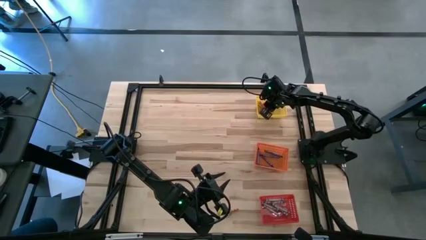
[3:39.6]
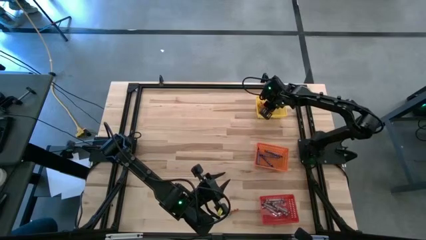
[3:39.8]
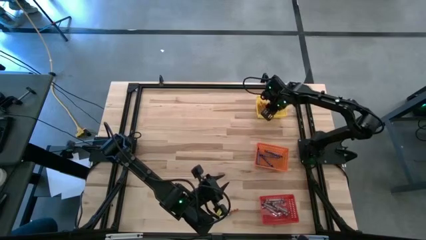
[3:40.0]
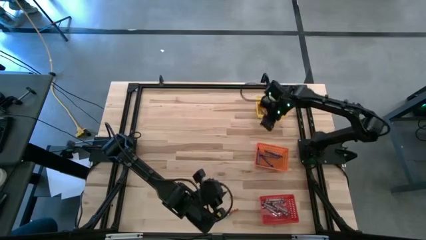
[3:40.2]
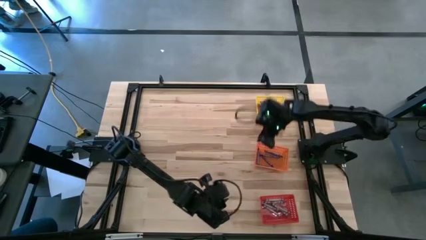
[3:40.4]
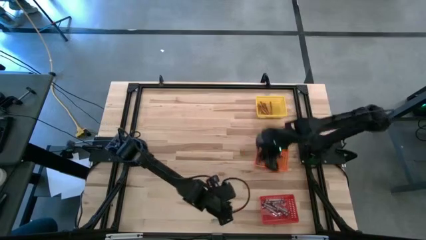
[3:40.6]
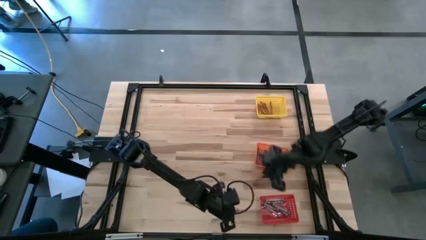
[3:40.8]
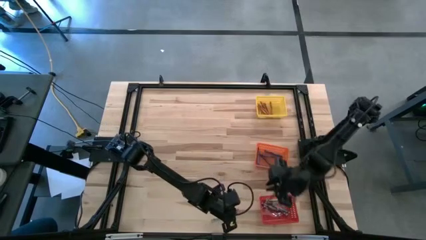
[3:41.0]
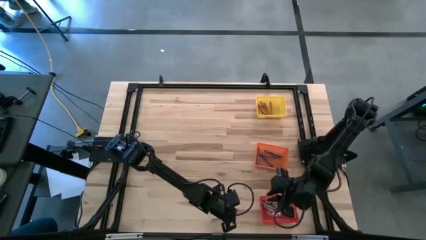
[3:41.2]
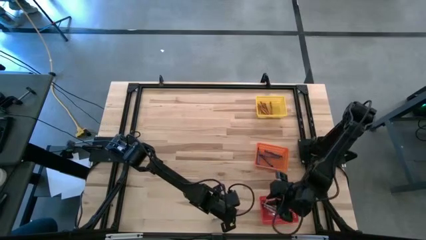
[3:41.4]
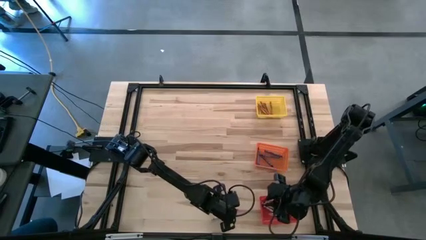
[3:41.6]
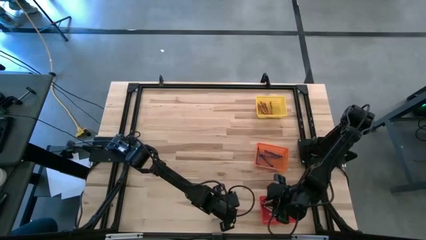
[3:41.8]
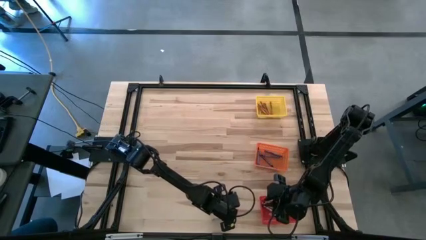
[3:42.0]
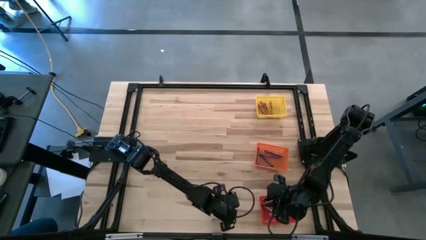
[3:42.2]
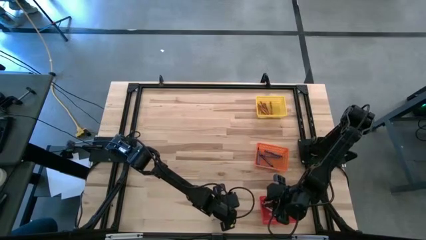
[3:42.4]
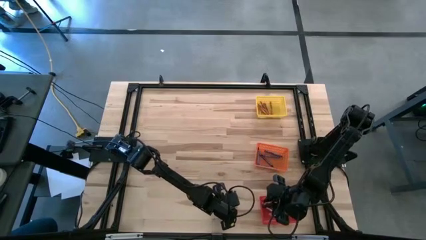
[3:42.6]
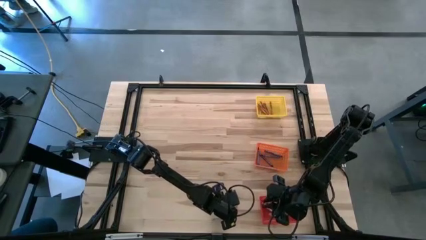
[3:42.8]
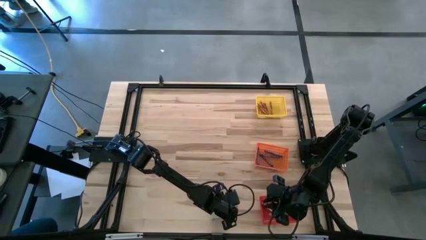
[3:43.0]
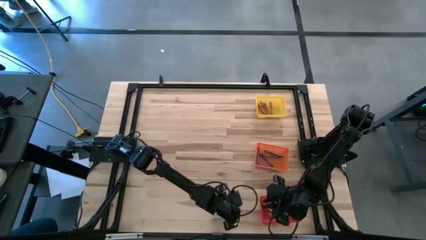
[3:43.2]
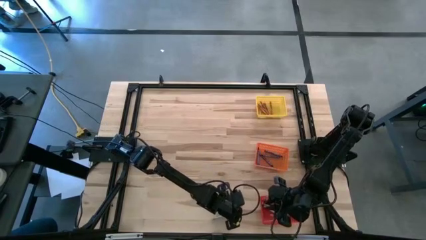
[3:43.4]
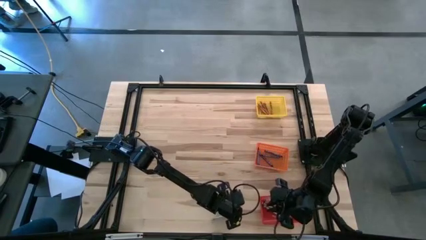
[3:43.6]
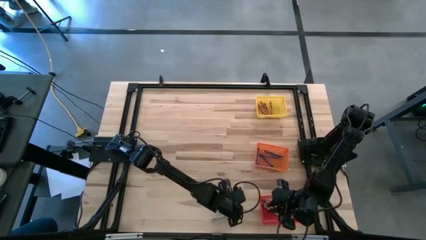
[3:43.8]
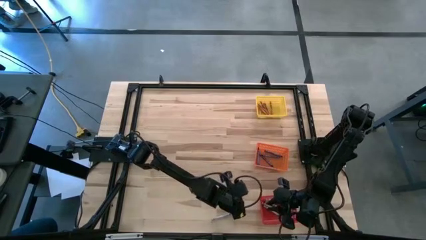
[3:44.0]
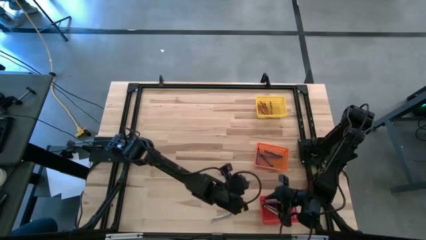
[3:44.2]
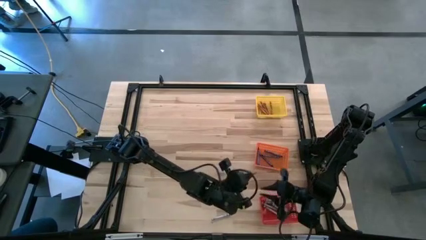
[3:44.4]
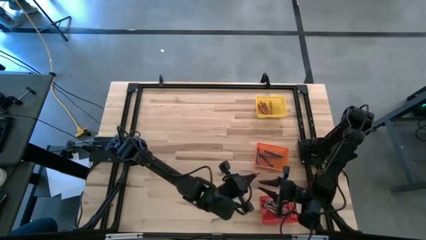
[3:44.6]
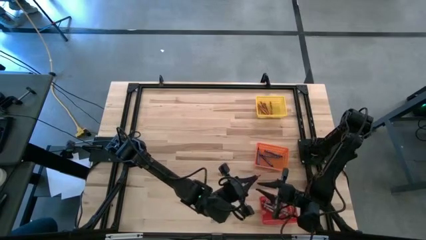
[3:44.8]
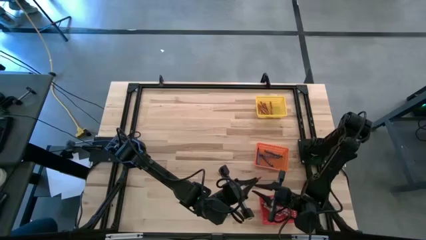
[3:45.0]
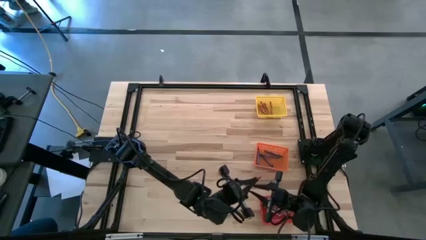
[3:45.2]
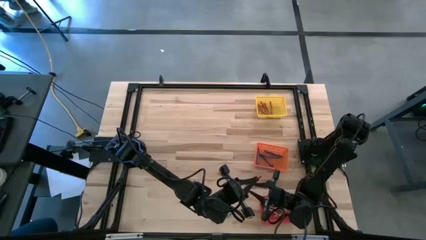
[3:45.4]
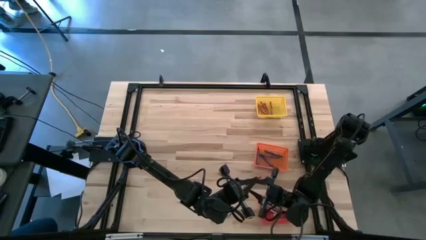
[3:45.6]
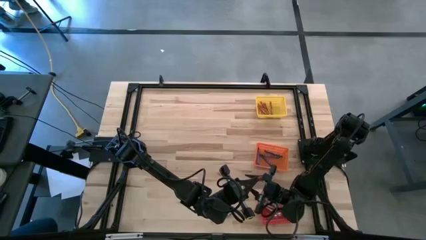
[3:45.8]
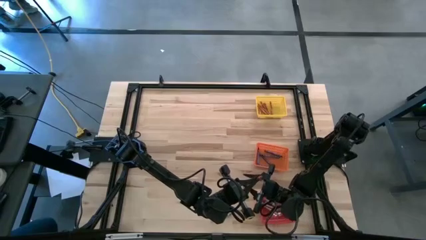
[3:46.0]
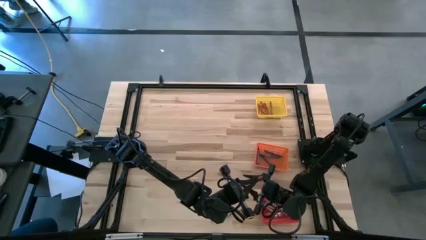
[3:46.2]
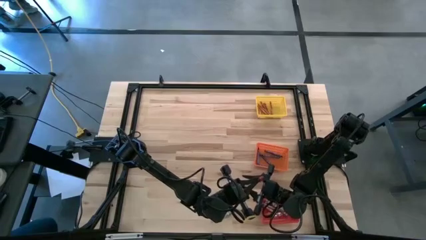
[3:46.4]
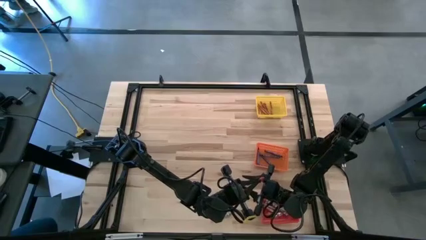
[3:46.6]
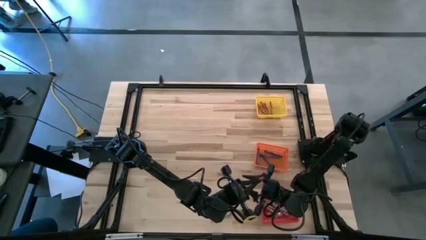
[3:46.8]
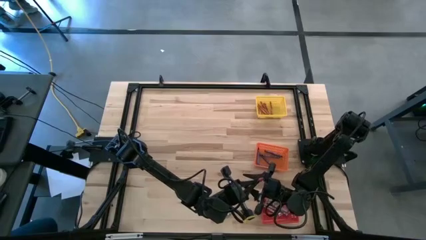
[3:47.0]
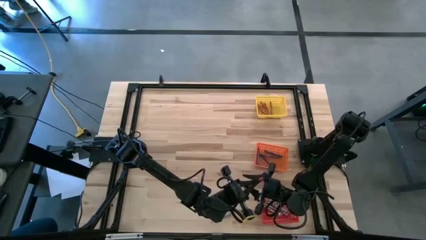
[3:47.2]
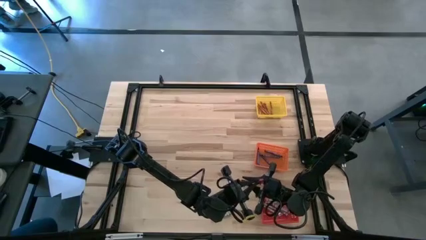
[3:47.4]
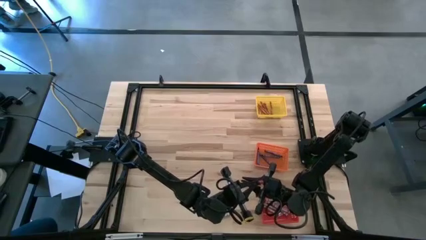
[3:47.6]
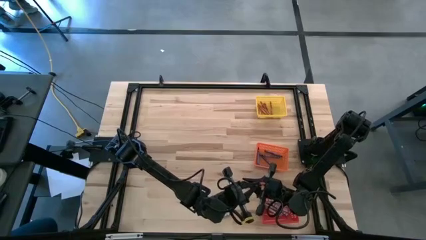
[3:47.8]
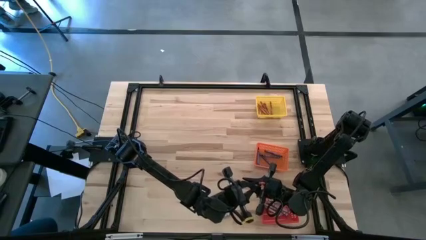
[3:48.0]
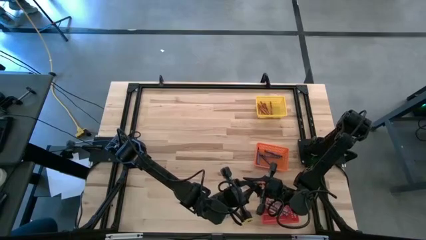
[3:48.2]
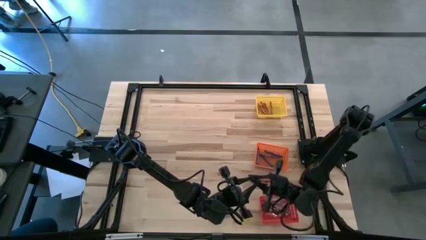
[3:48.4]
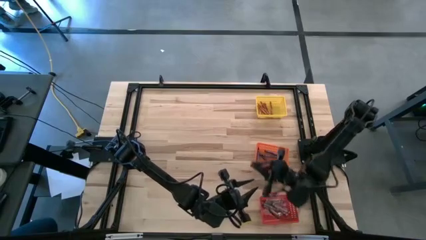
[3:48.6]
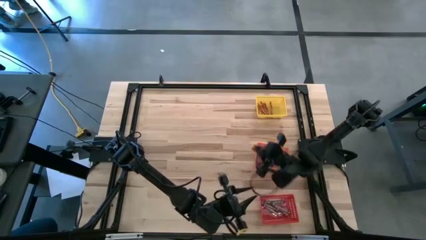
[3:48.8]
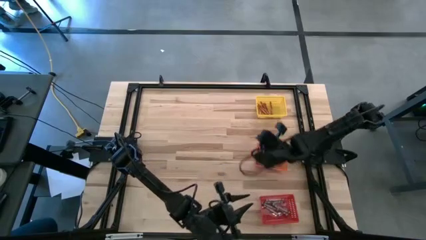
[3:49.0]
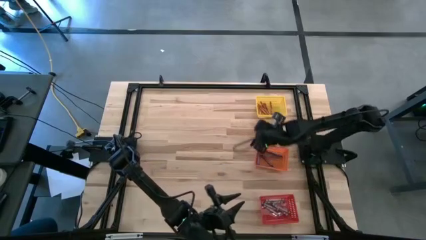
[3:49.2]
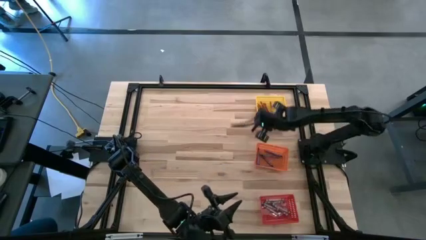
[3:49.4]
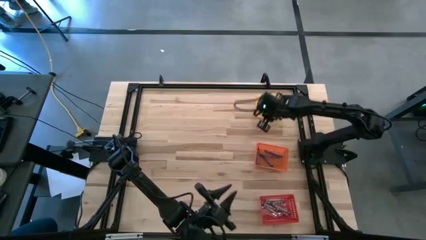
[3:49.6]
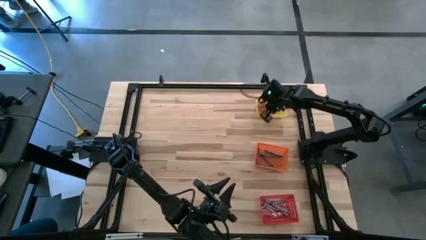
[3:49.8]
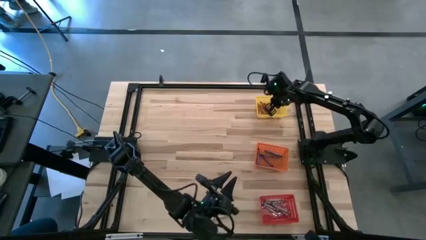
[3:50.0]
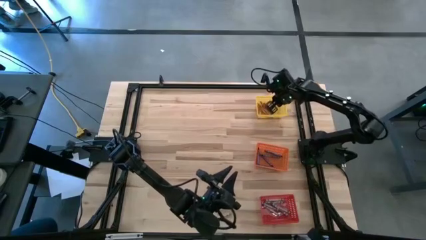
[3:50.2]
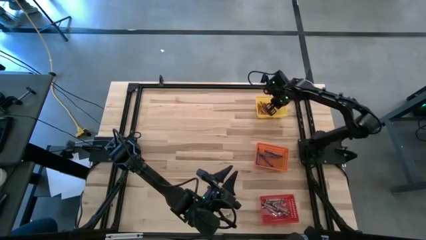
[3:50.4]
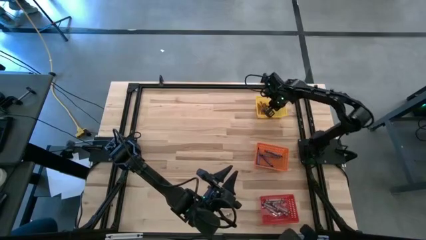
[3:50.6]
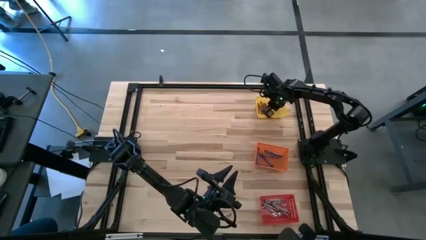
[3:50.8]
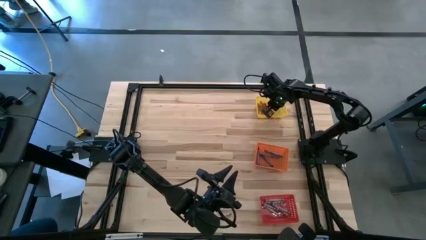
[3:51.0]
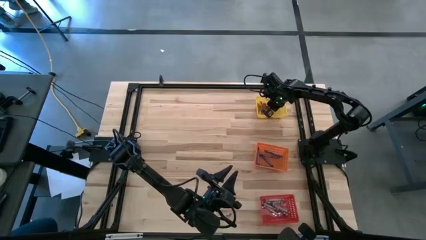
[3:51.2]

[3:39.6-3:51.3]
Task: Sort crayons
Put the orange crayon into the yellow bin
